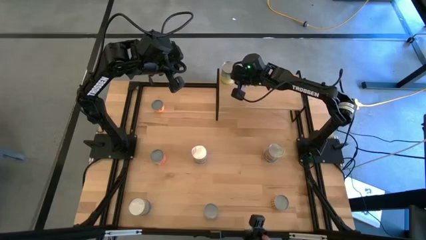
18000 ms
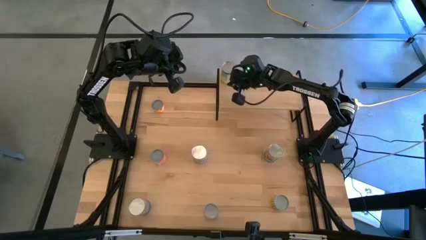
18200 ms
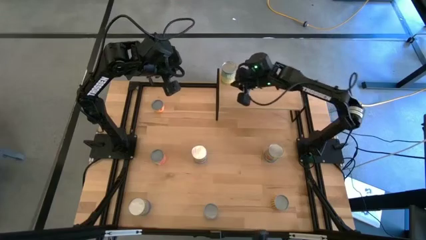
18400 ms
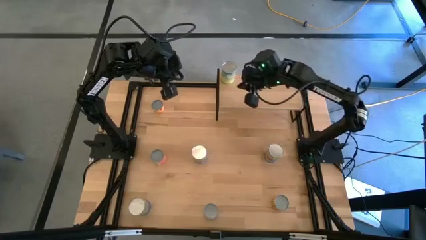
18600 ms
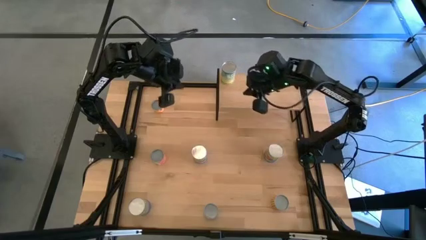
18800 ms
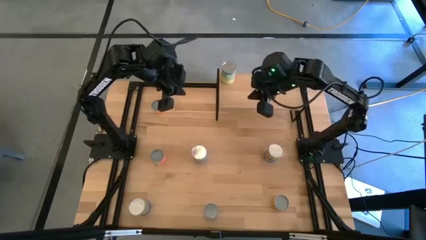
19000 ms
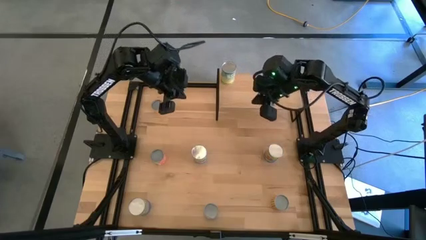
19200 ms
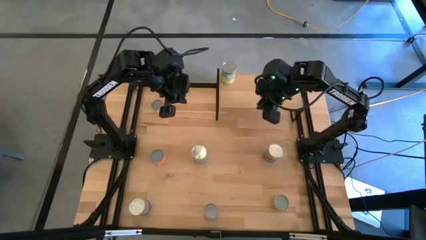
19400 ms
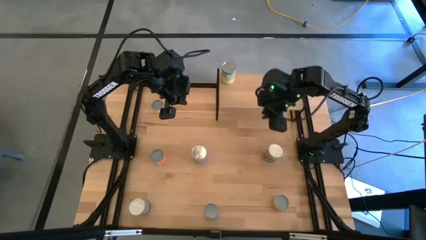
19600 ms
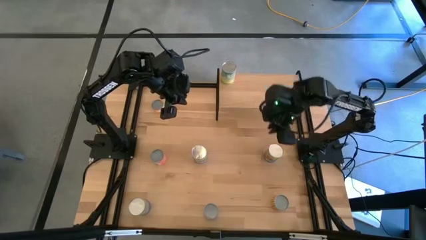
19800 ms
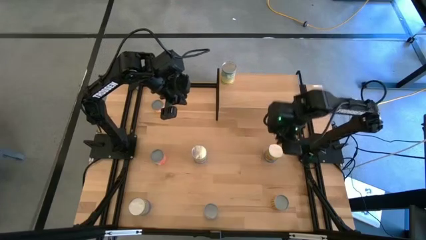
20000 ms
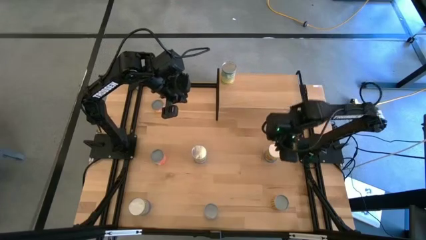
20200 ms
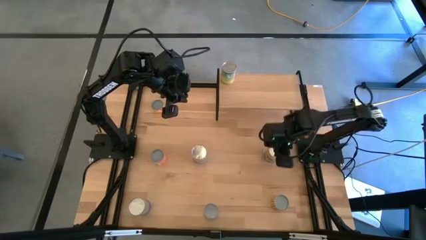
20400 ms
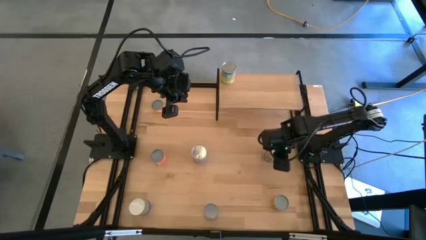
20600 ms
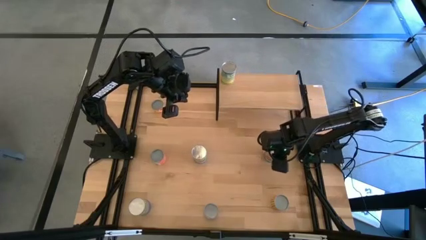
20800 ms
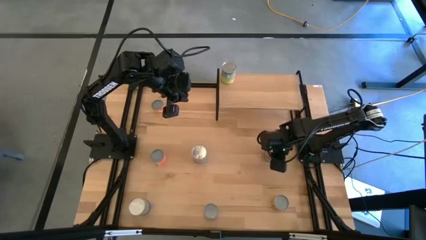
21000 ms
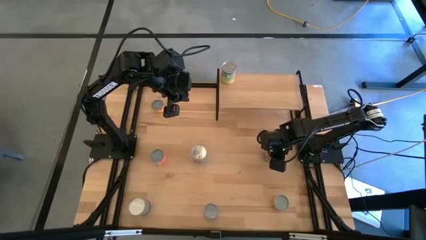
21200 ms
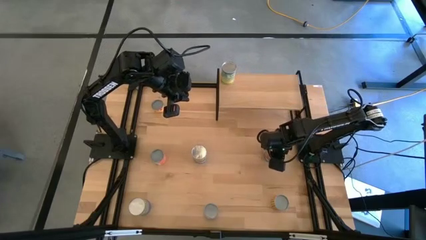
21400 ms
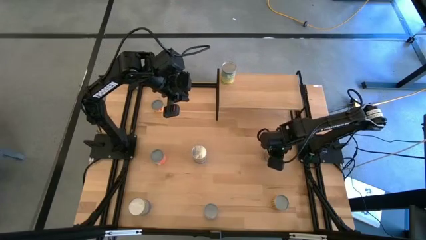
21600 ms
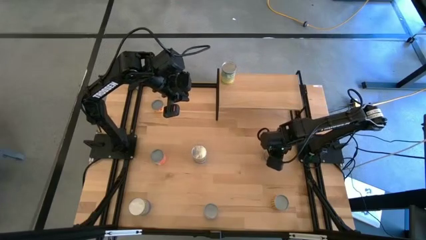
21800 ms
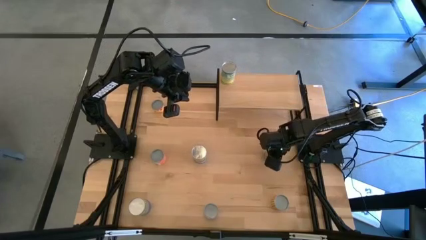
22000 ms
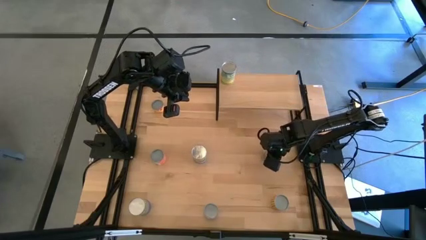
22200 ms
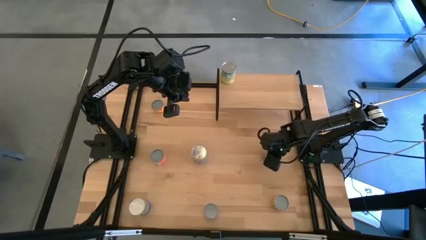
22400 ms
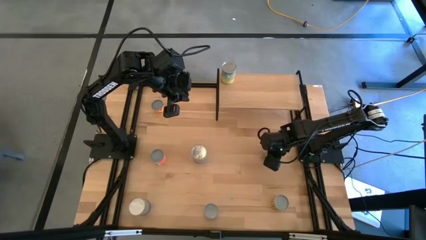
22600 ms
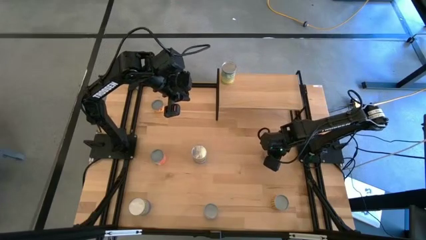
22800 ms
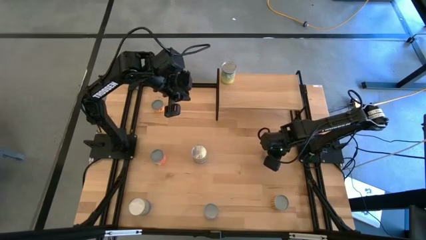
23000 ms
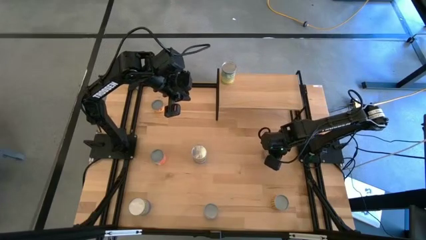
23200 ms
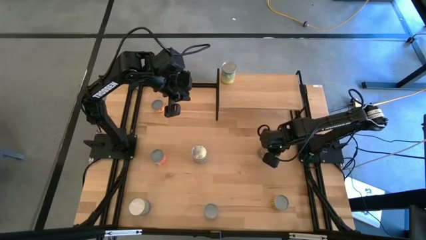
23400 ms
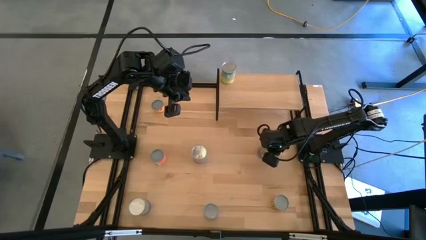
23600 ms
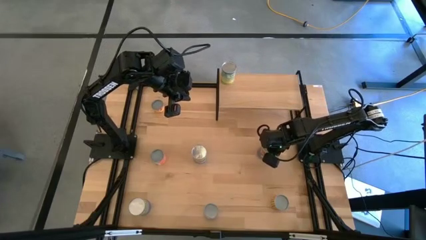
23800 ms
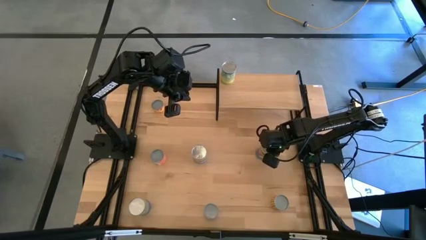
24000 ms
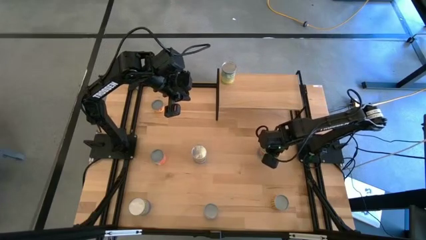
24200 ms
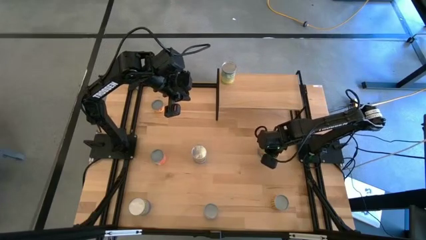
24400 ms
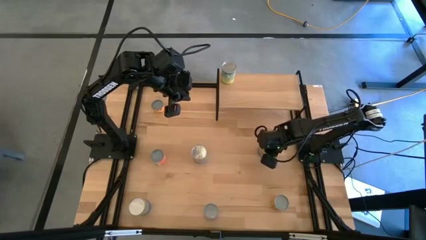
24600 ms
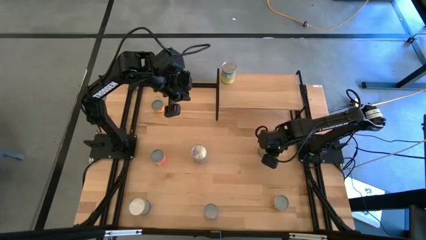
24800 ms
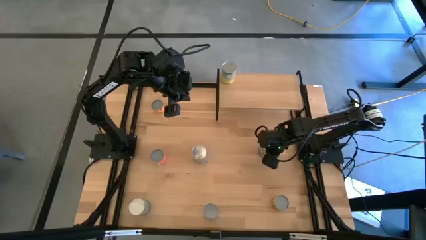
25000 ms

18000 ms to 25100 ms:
Task: Pick and place cans onto a shelf
Put the right canned tomatoes on the shelf

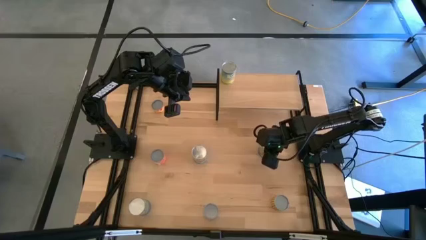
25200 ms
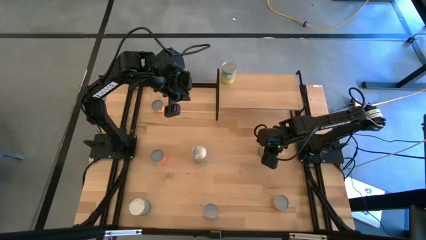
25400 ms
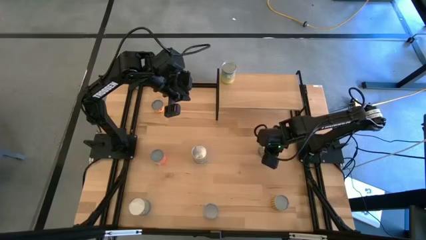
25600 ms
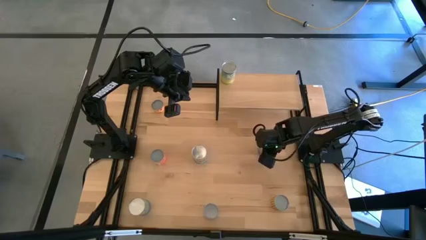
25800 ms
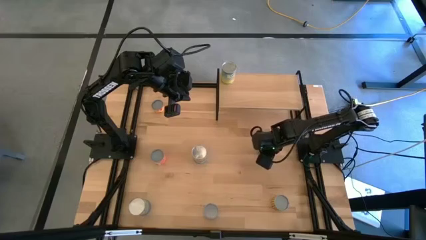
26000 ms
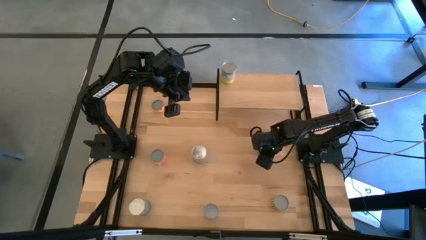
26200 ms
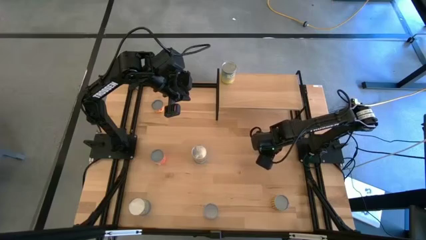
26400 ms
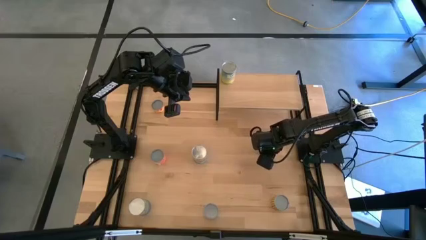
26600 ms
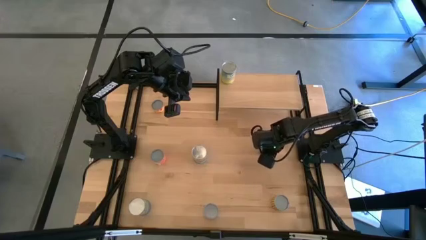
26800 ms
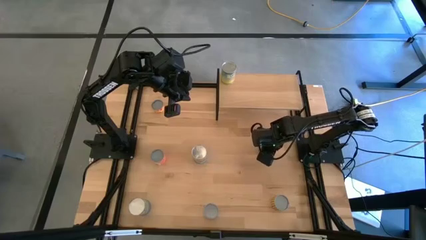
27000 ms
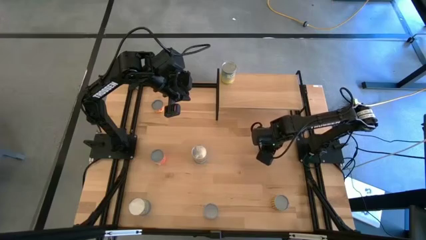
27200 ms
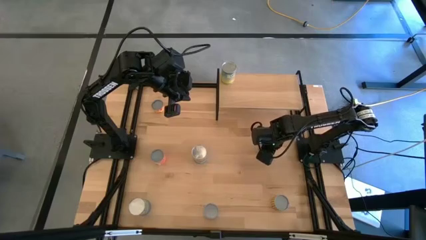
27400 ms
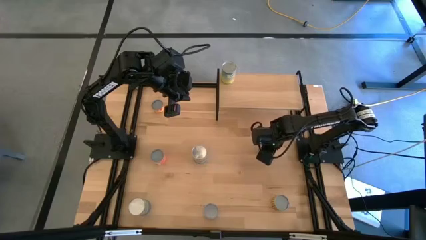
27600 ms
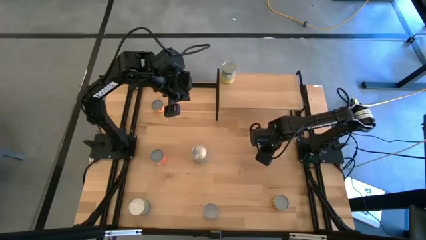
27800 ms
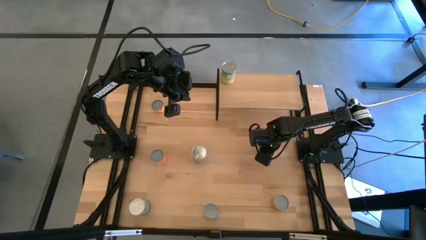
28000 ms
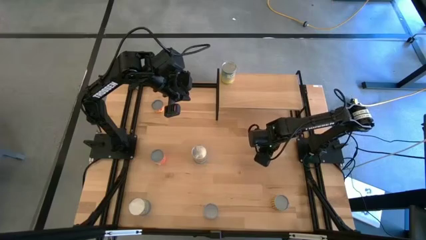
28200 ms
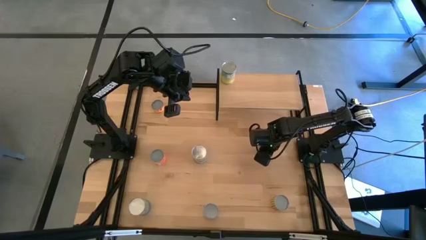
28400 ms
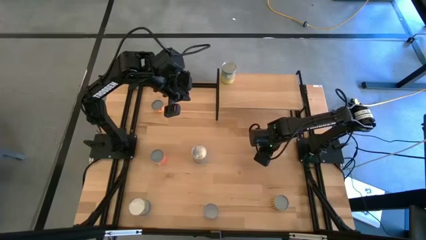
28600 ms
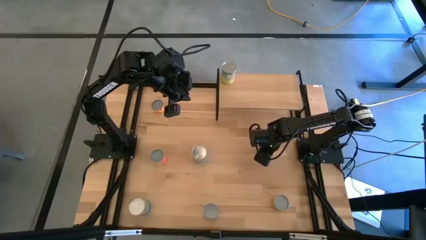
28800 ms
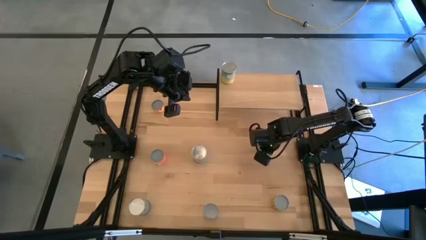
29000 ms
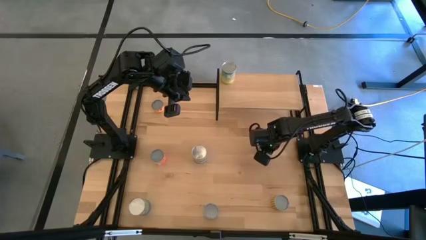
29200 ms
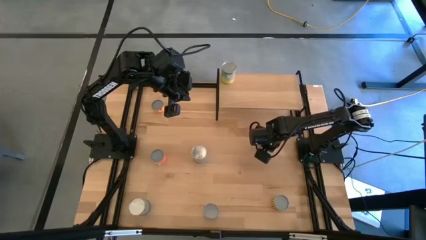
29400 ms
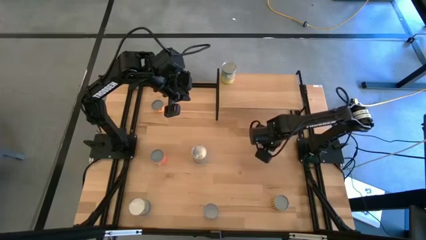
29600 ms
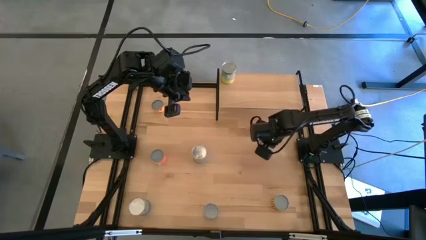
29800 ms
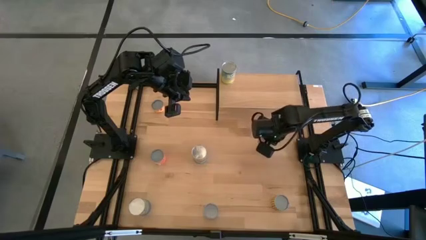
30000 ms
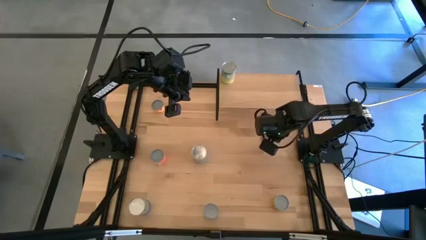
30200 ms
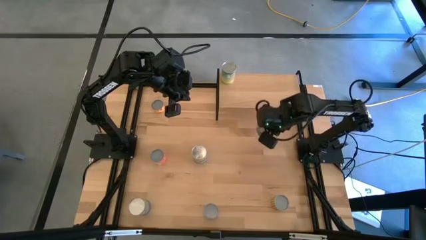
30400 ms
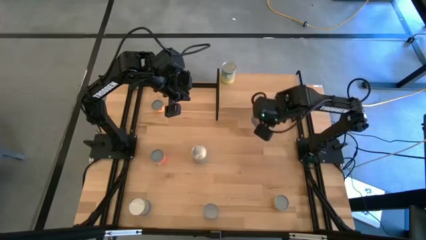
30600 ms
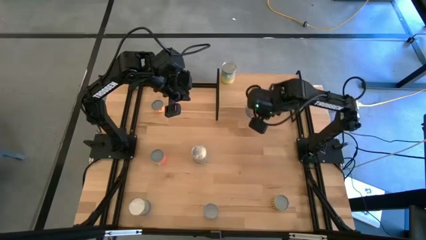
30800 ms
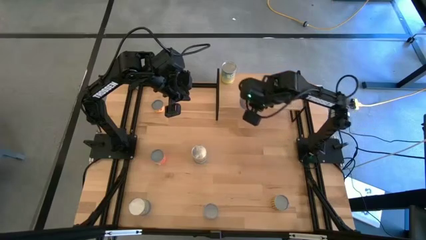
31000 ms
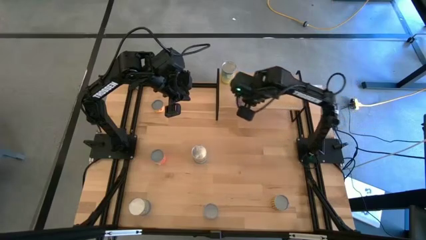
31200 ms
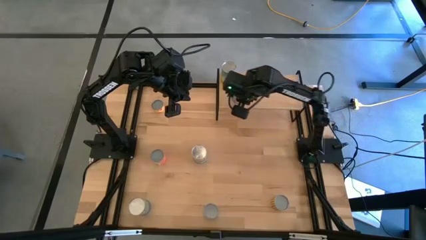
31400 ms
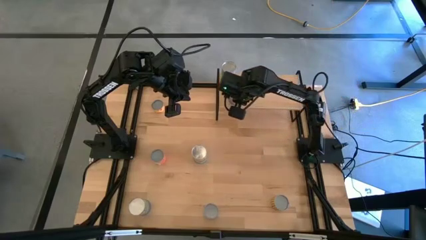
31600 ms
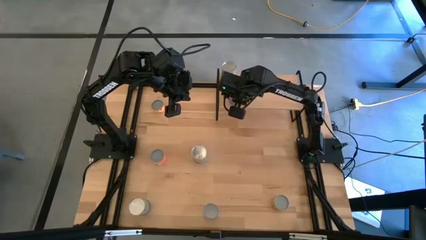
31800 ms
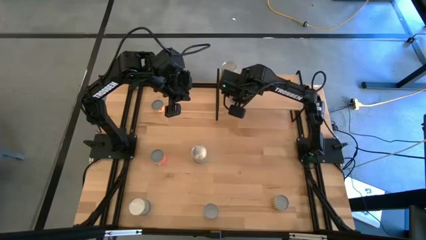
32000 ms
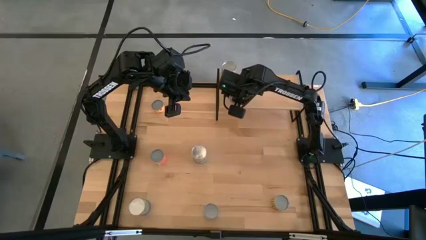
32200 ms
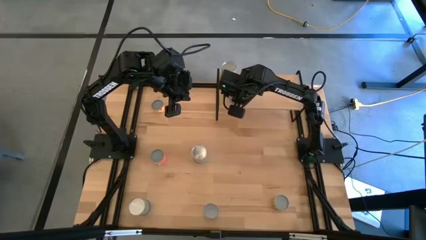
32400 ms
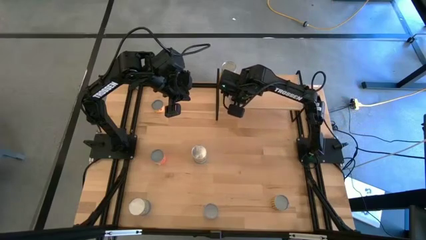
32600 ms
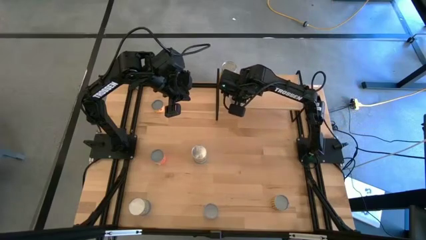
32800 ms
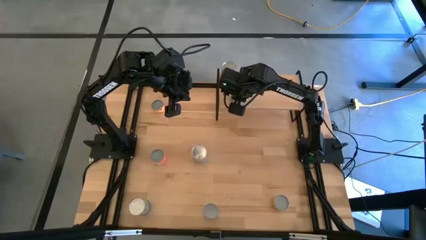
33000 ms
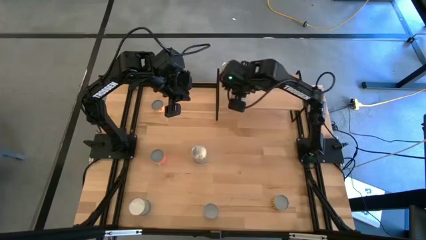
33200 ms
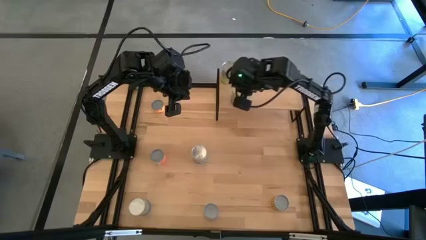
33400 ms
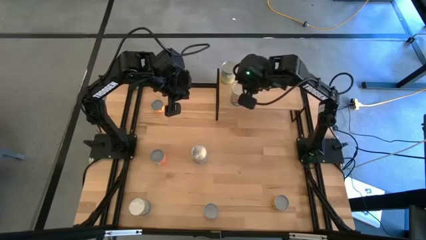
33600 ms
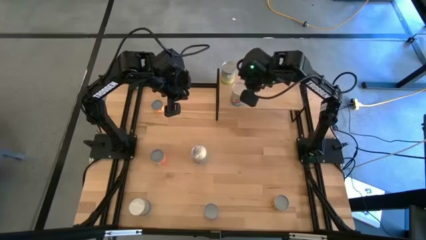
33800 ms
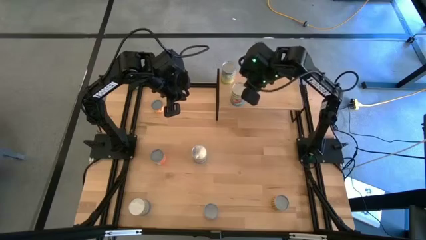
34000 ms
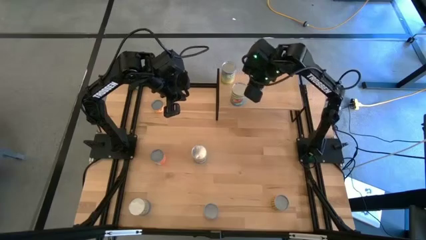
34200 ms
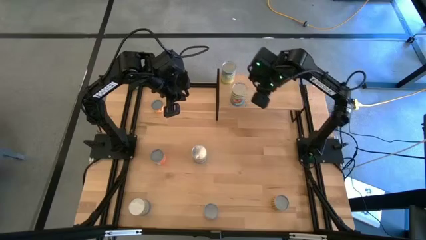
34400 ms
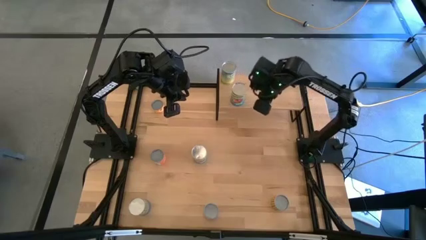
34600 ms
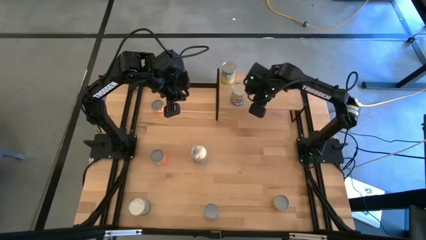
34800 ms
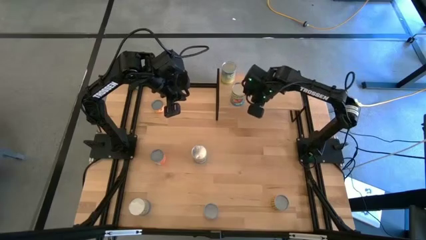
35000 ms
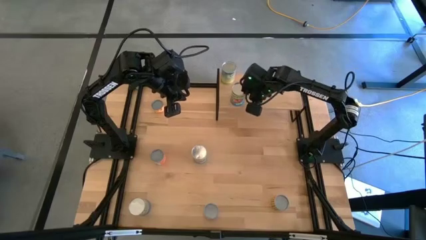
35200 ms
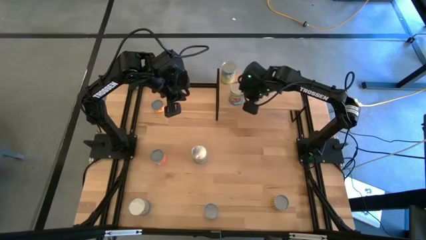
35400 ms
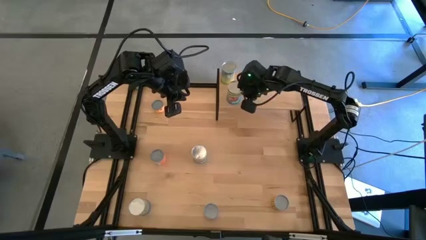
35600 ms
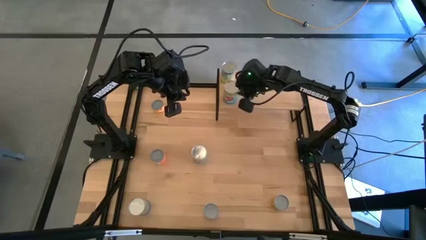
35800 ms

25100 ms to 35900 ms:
Put the right canned tomatoes on the shelf
